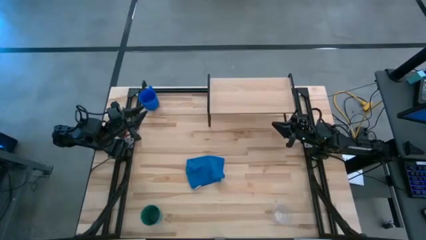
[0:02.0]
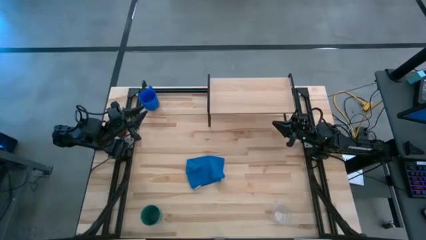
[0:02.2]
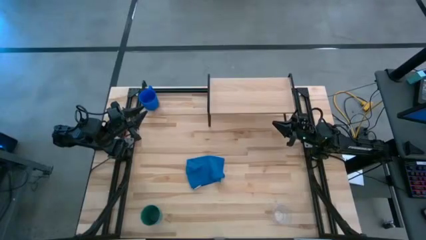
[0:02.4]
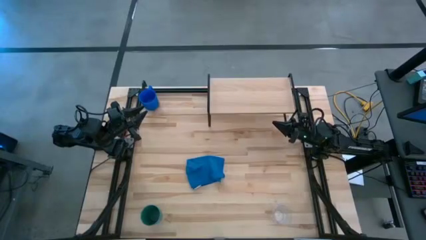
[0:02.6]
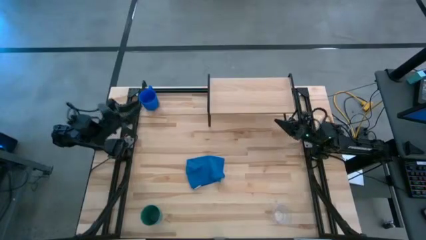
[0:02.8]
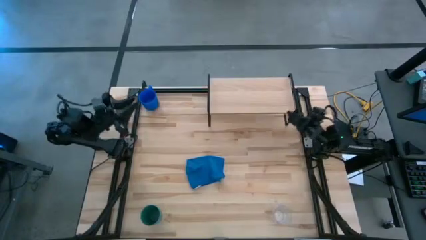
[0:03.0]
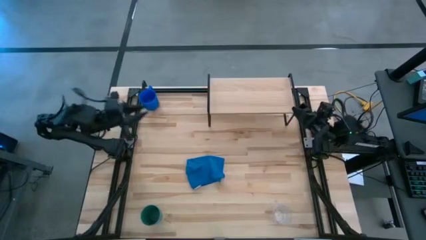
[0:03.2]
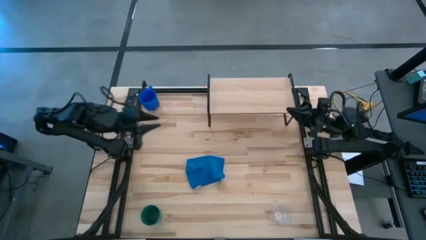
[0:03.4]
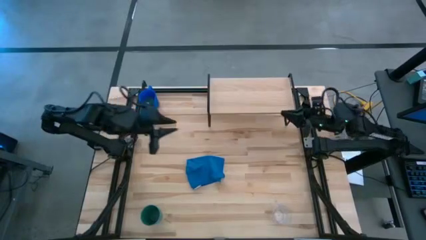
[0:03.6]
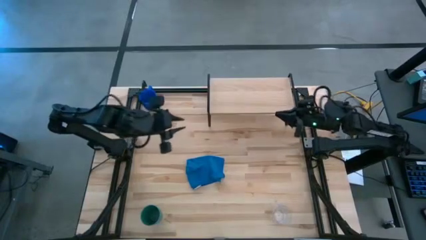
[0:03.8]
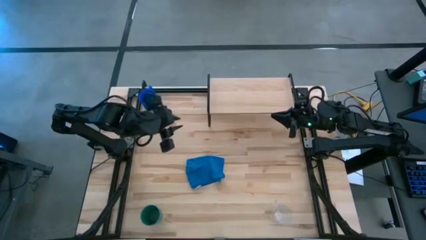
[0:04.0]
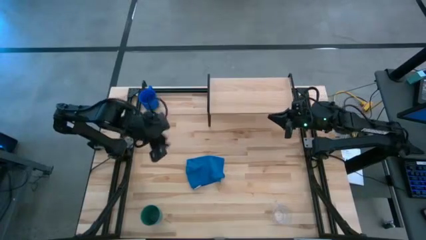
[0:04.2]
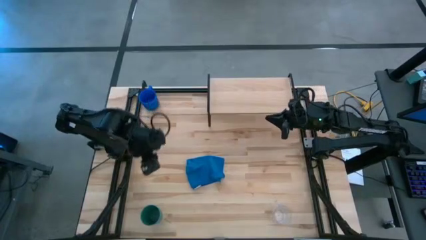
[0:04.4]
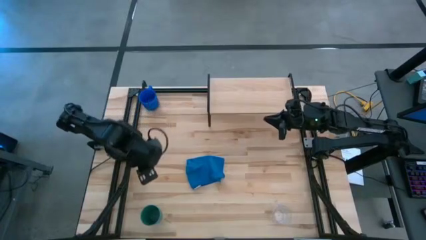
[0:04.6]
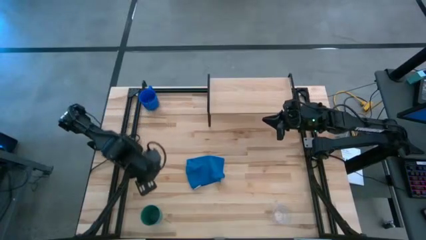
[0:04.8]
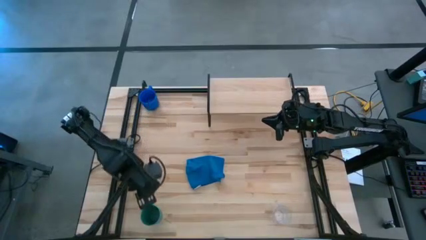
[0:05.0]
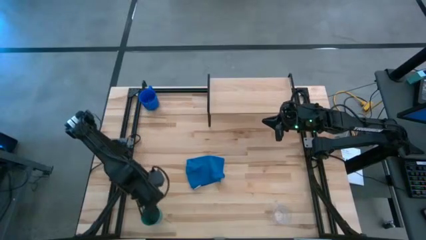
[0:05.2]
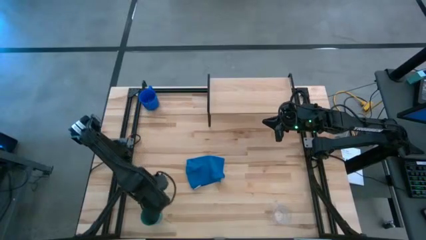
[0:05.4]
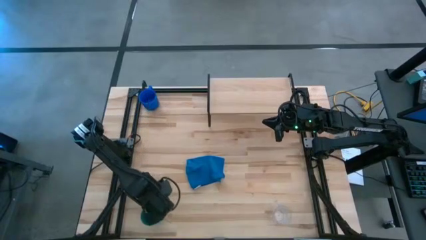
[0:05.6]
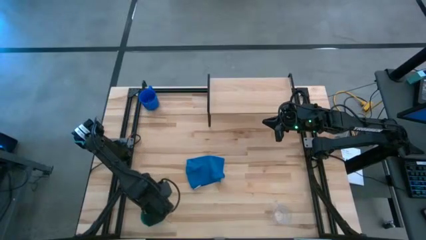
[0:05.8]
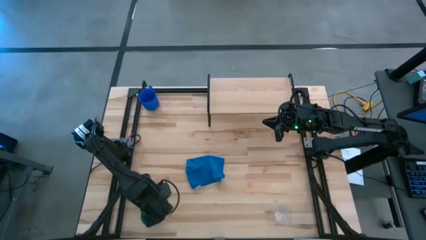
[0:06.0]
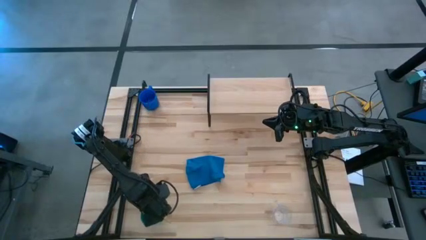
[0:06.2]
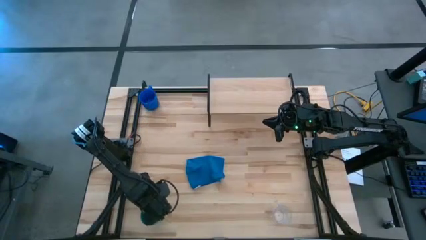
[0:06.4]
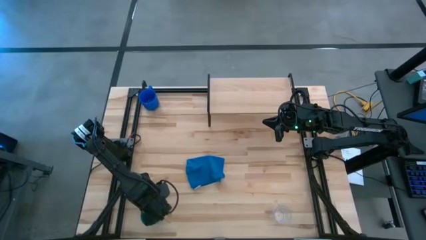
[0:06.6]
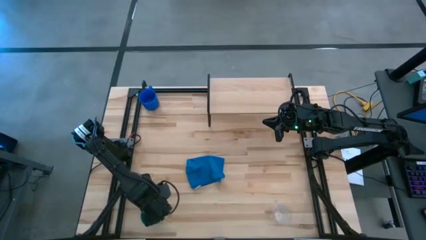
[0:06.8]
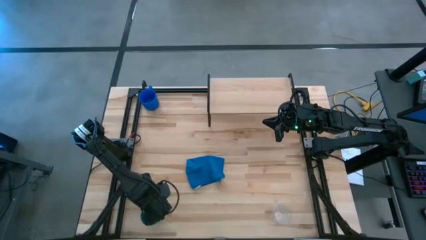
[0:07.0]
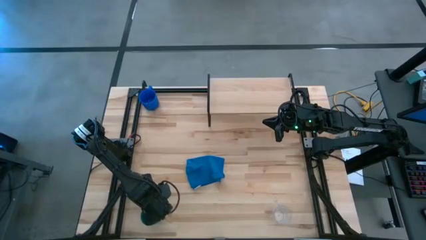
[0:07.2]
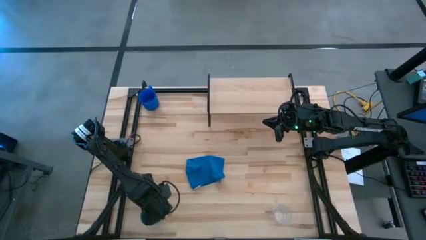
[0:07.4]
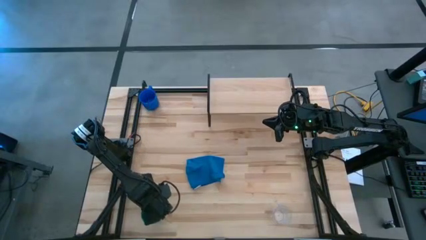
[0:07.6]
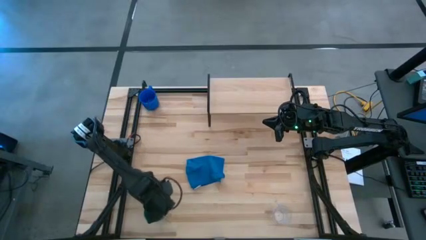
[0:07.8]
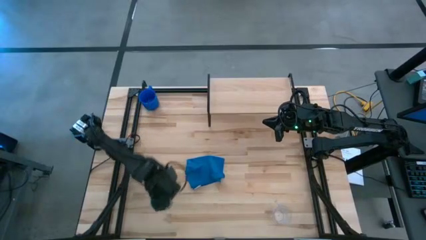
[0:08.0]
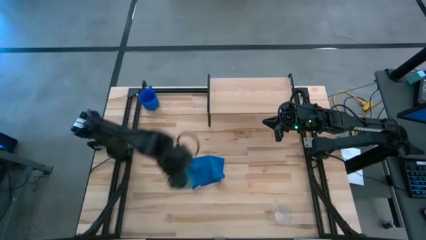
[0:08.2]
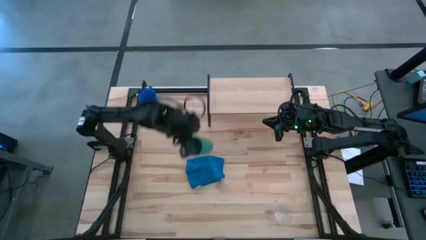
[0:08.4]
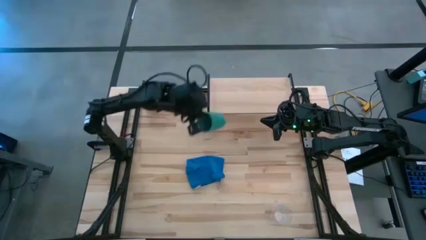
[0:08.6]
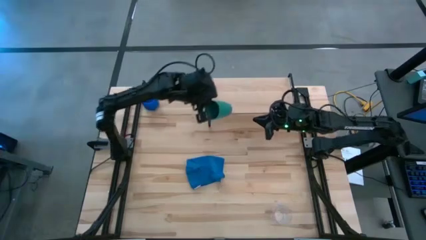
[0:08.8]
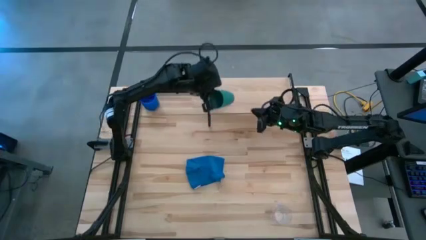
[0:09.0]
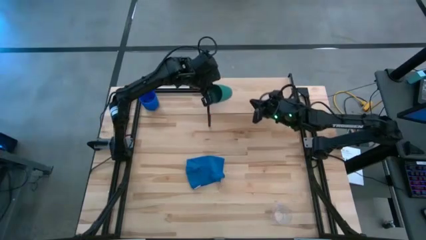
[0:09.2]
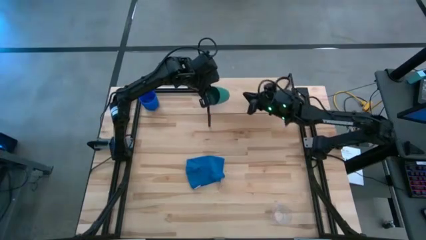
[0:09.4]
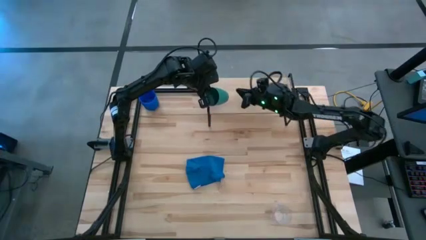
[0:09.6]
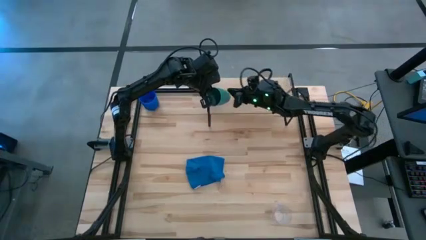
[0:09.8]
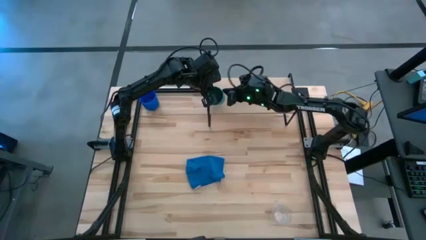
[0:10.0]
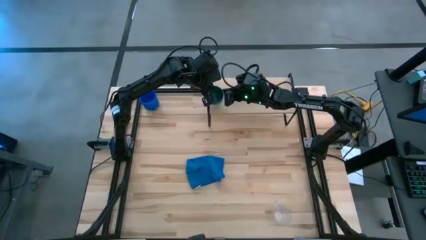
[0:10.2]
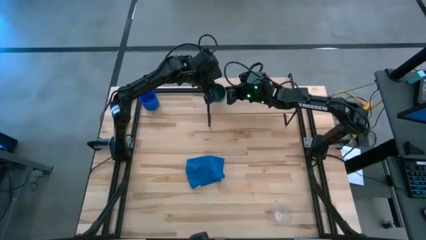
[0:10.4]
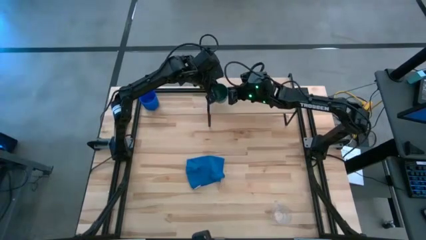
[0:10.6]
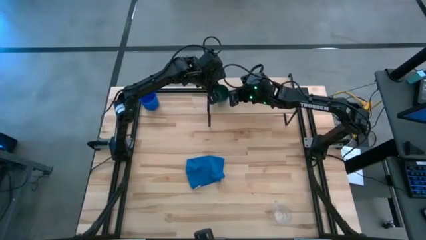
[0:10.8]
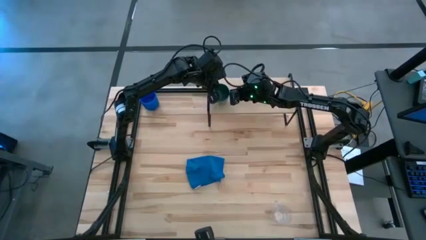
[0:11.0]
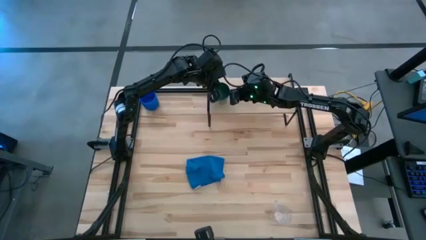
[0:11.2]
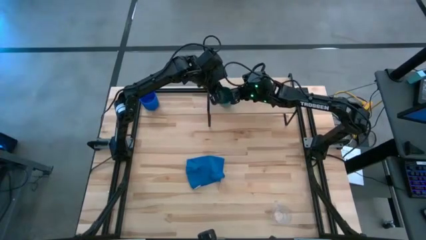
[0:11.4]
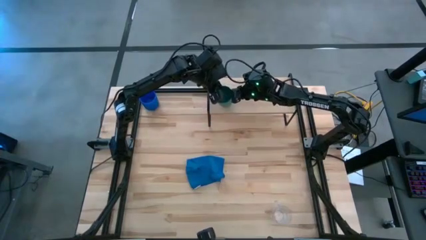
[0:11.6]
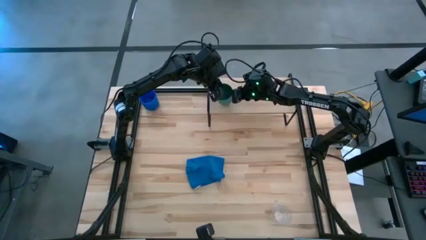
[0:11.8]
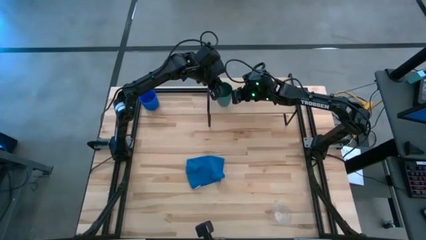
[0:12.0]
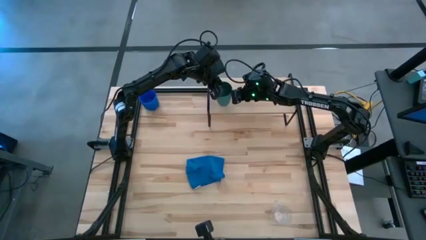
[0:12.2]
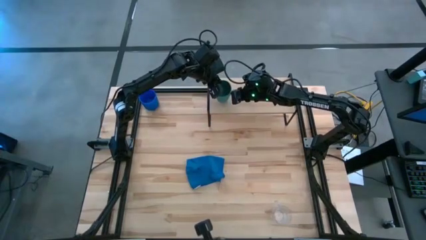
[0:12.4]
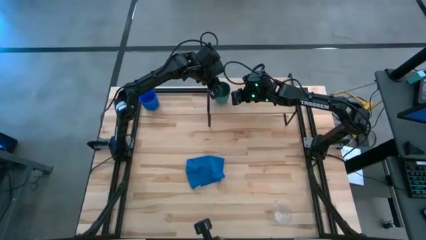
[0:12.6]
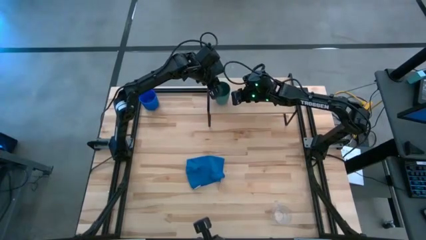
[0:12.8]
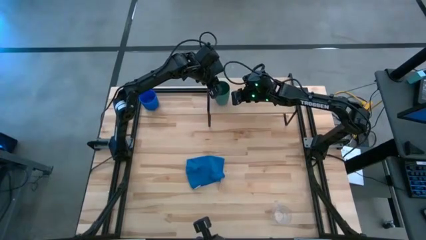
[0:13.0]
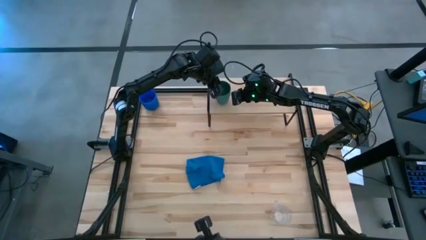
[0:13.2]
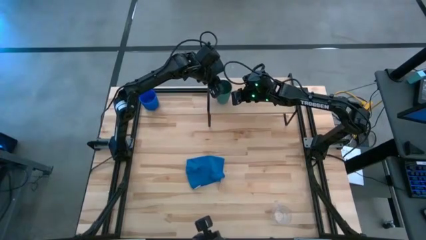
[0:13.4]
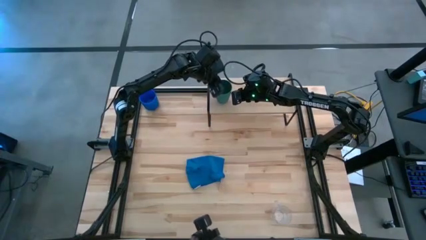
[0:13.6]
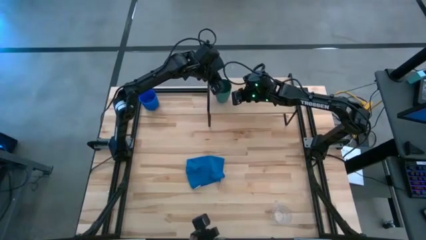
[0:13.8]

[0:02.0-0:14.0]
Task: Stack small to large cups/mugs on shelf
Put the green cup on the shelf
